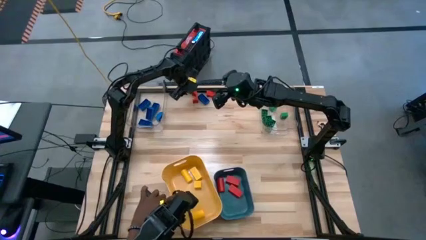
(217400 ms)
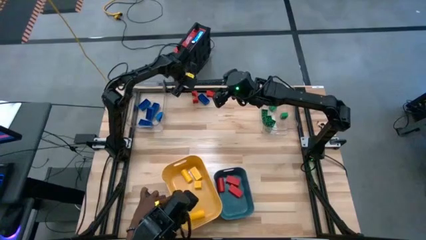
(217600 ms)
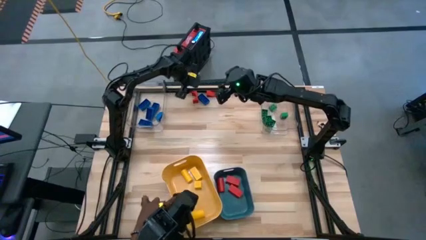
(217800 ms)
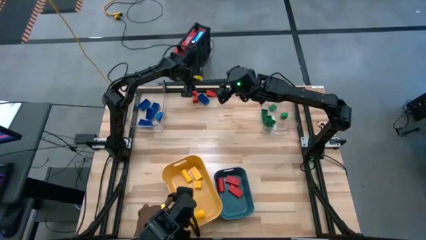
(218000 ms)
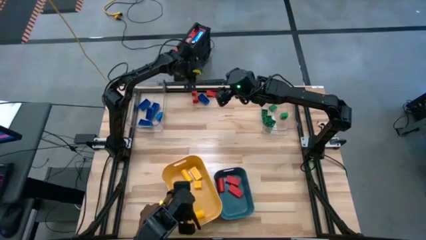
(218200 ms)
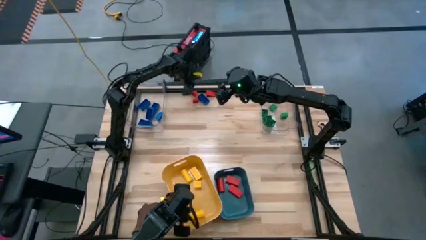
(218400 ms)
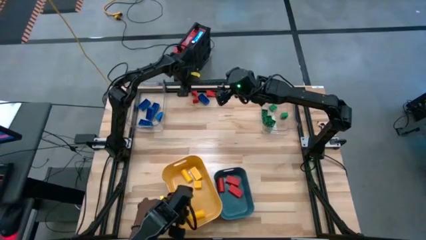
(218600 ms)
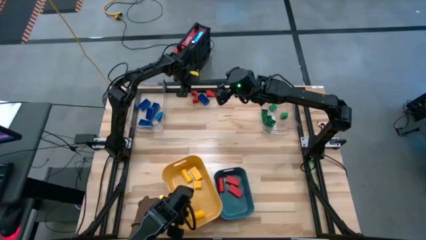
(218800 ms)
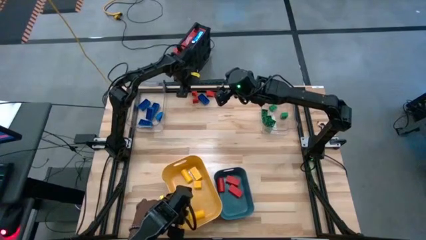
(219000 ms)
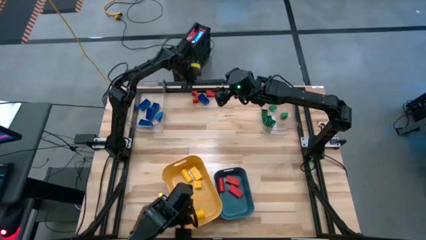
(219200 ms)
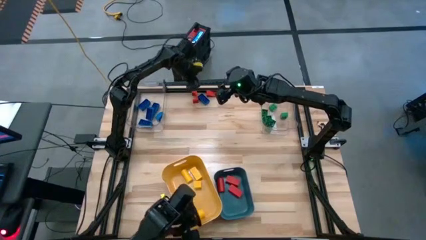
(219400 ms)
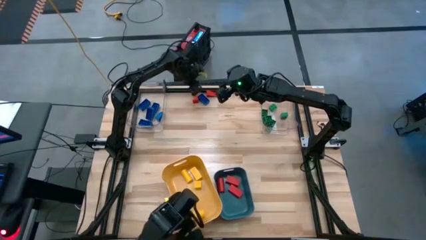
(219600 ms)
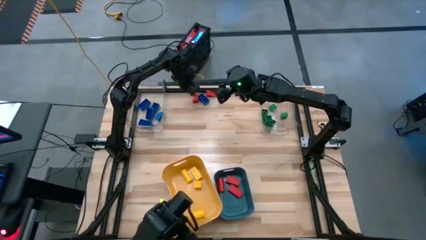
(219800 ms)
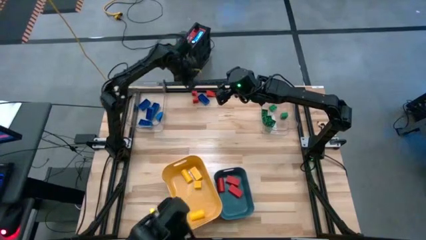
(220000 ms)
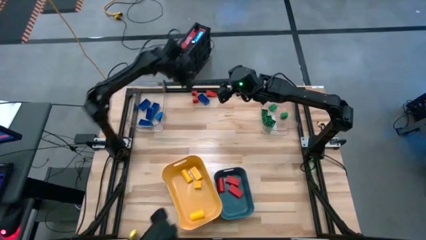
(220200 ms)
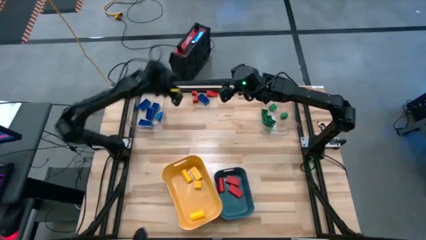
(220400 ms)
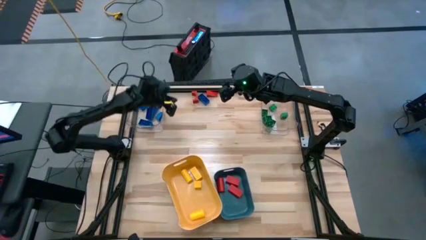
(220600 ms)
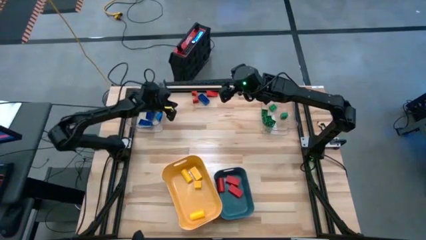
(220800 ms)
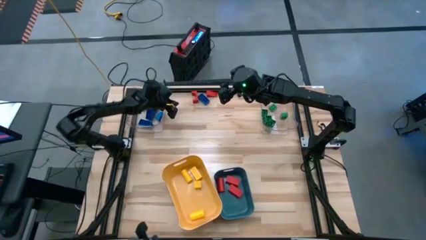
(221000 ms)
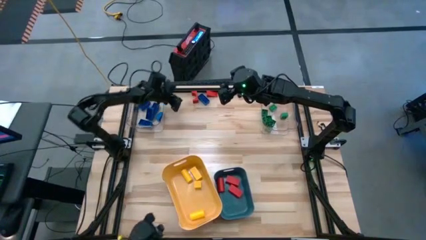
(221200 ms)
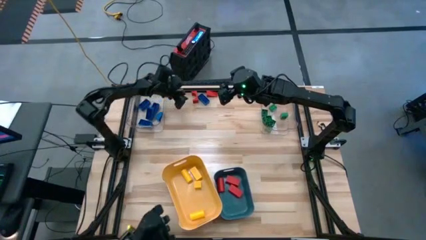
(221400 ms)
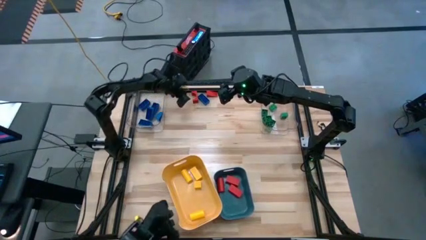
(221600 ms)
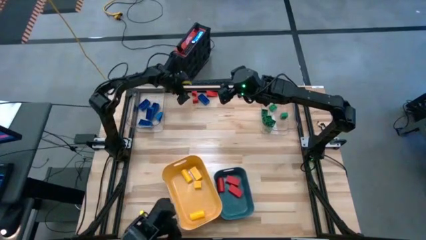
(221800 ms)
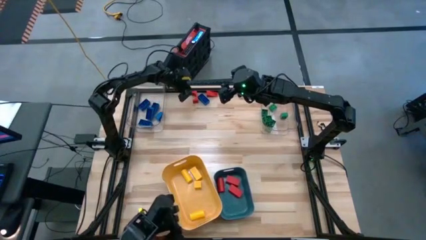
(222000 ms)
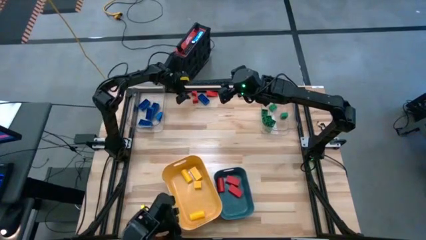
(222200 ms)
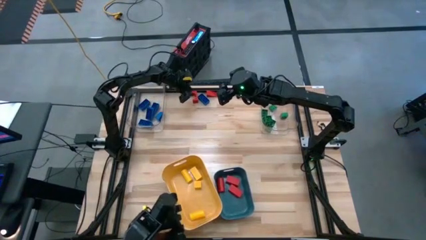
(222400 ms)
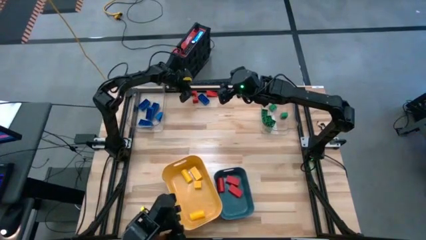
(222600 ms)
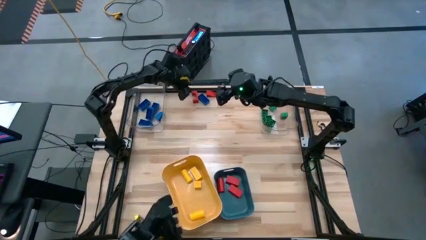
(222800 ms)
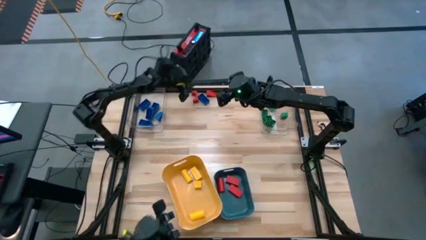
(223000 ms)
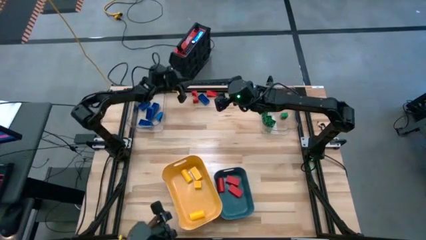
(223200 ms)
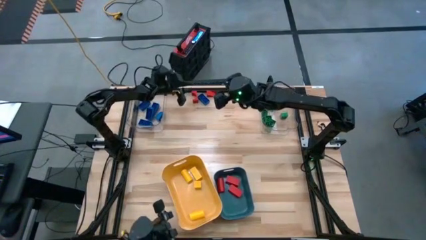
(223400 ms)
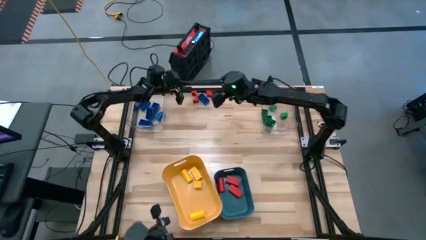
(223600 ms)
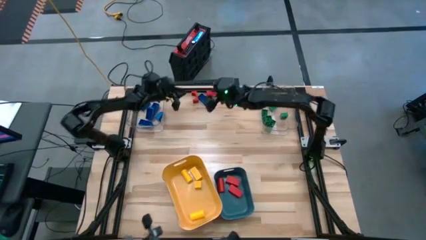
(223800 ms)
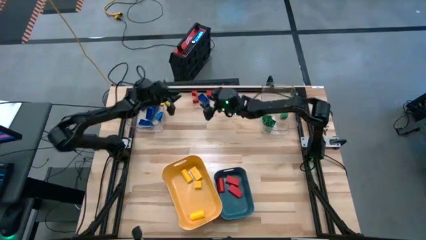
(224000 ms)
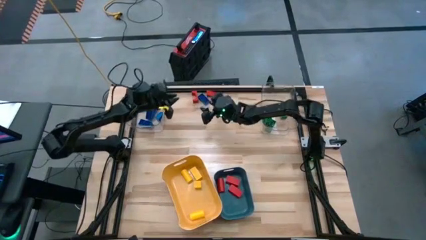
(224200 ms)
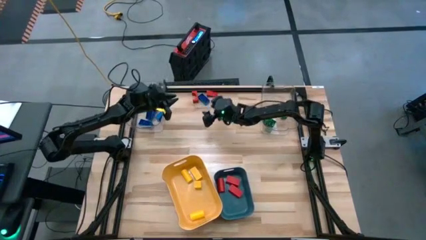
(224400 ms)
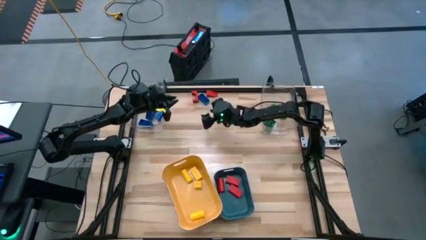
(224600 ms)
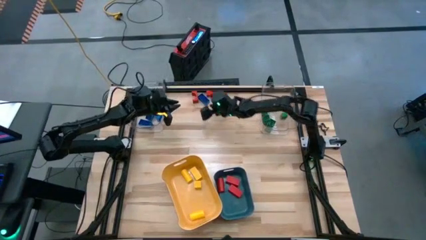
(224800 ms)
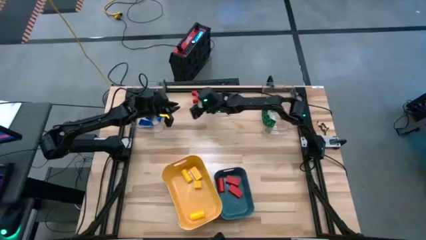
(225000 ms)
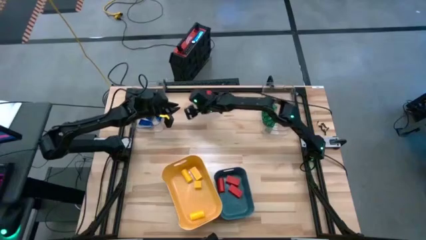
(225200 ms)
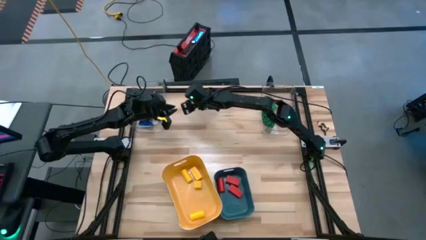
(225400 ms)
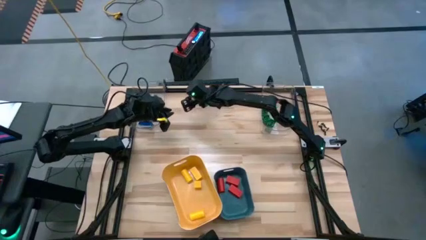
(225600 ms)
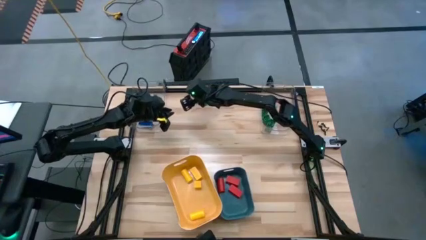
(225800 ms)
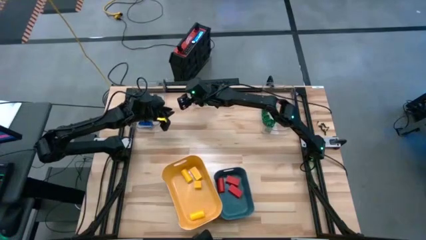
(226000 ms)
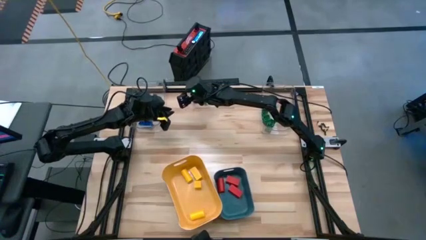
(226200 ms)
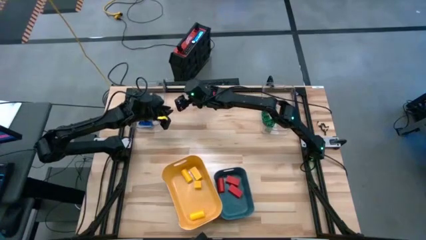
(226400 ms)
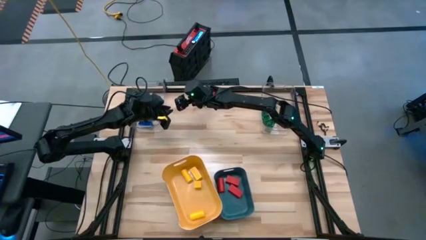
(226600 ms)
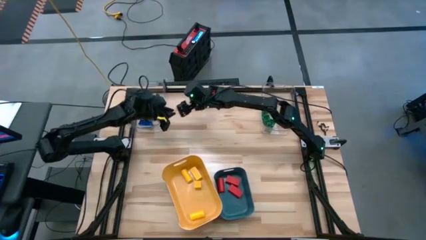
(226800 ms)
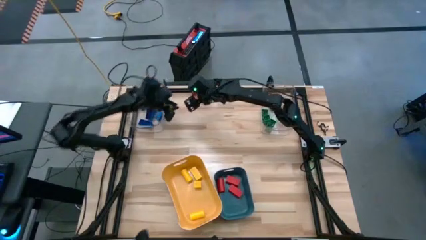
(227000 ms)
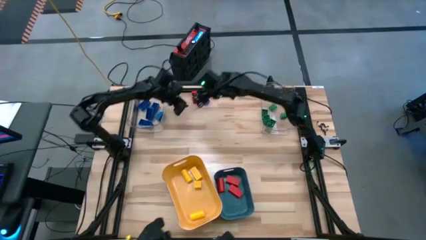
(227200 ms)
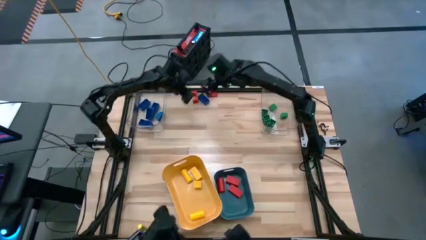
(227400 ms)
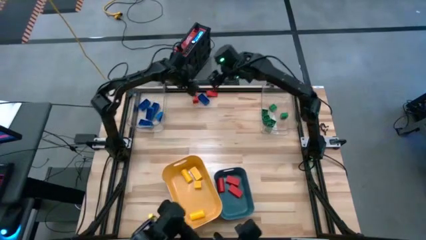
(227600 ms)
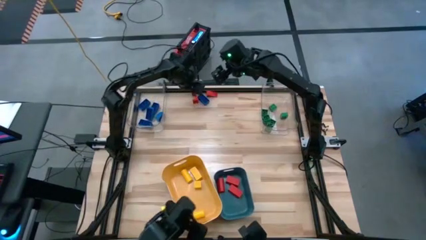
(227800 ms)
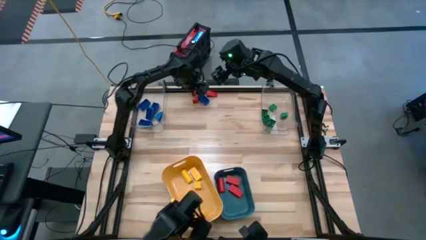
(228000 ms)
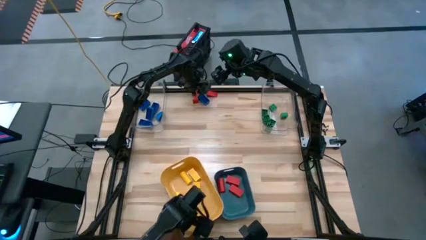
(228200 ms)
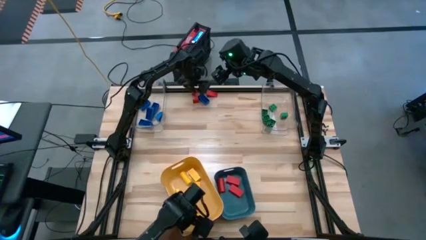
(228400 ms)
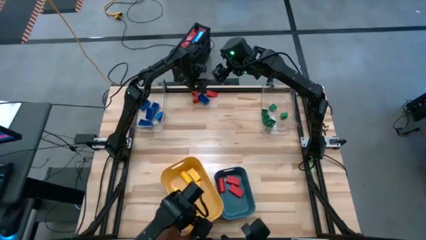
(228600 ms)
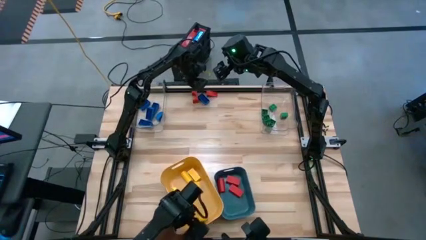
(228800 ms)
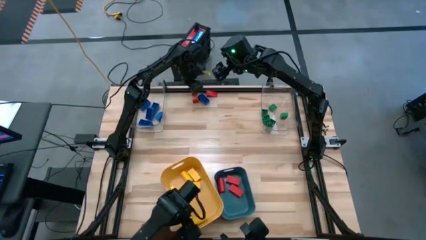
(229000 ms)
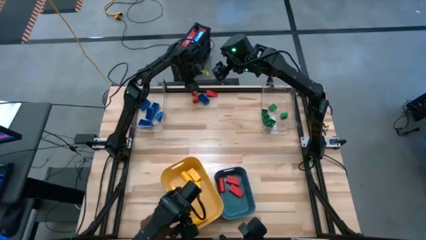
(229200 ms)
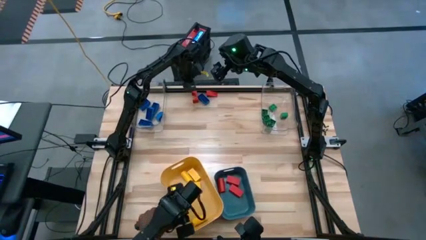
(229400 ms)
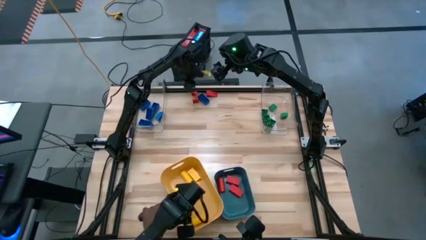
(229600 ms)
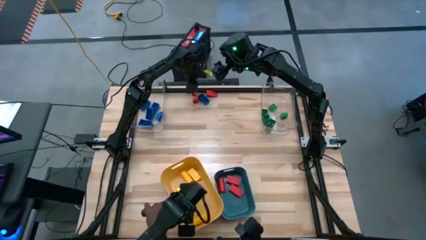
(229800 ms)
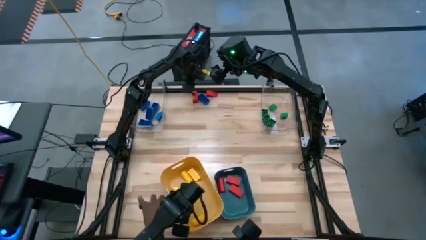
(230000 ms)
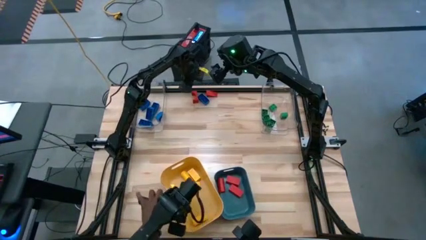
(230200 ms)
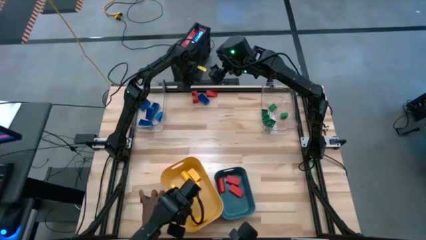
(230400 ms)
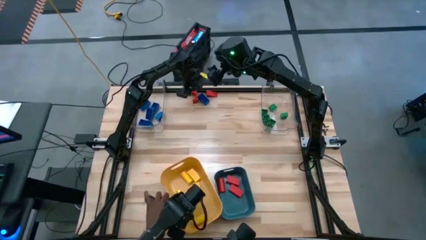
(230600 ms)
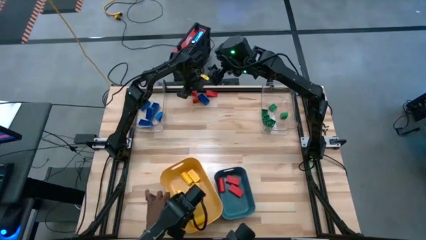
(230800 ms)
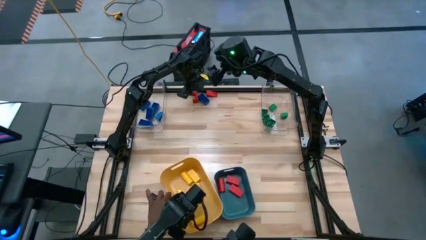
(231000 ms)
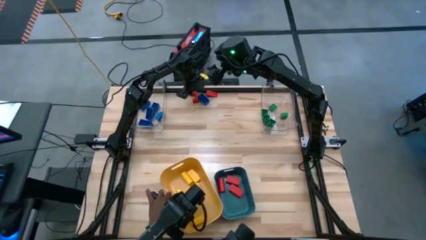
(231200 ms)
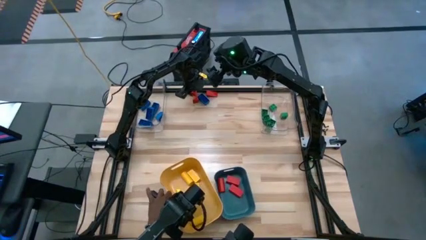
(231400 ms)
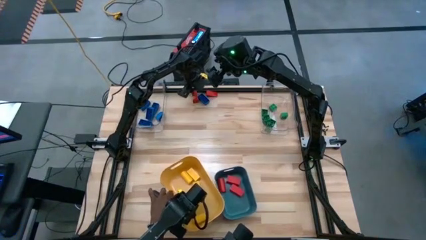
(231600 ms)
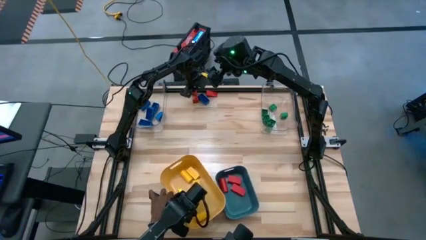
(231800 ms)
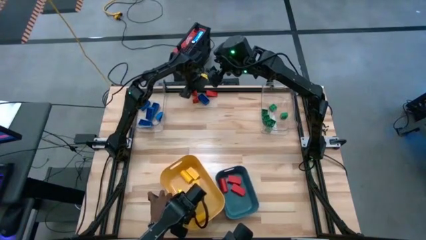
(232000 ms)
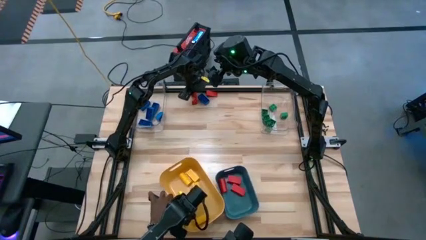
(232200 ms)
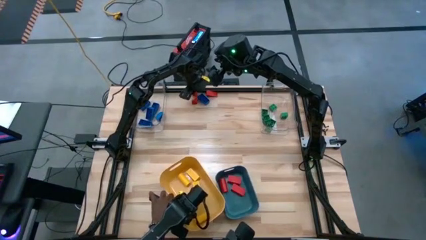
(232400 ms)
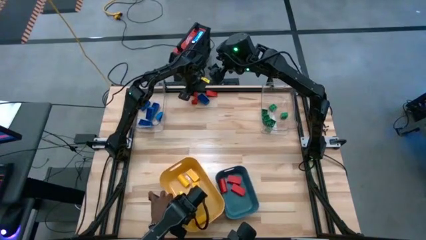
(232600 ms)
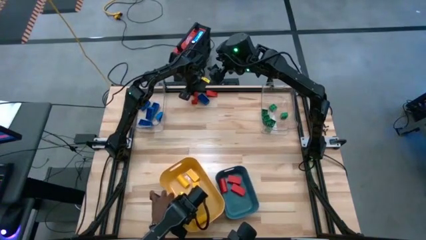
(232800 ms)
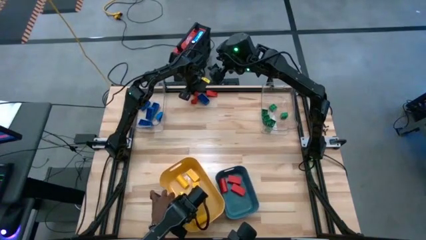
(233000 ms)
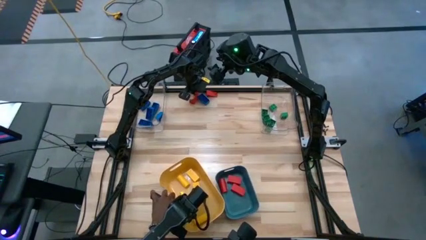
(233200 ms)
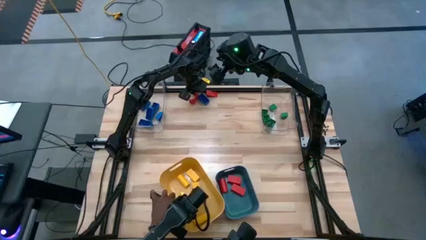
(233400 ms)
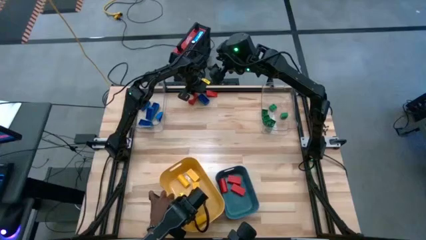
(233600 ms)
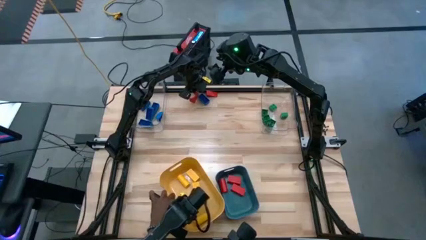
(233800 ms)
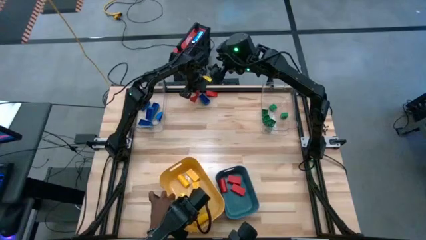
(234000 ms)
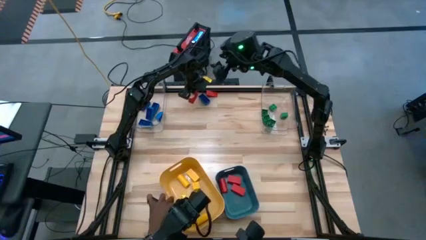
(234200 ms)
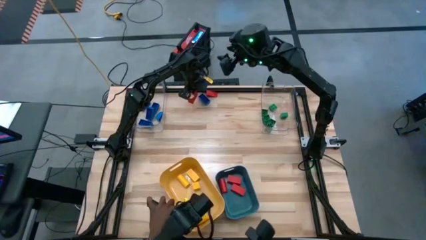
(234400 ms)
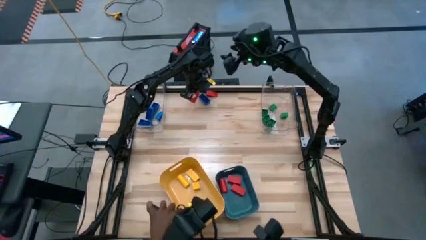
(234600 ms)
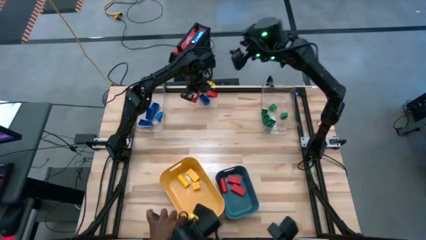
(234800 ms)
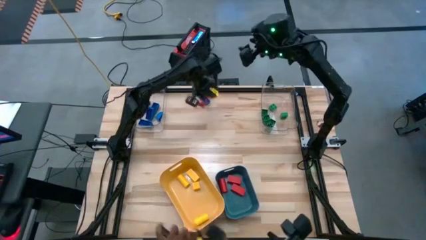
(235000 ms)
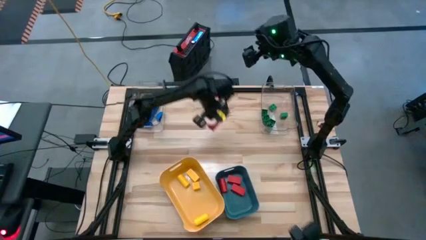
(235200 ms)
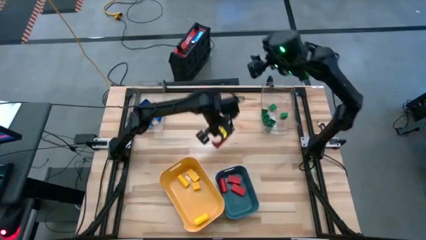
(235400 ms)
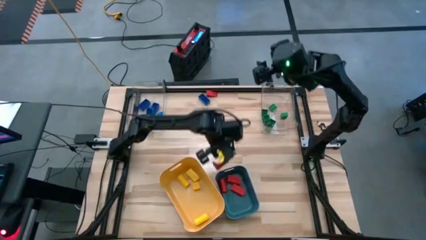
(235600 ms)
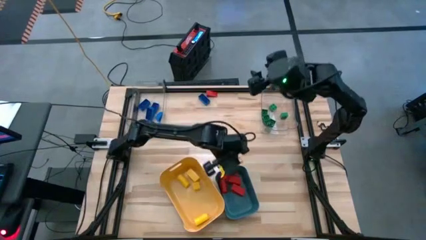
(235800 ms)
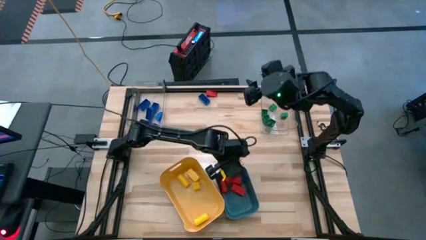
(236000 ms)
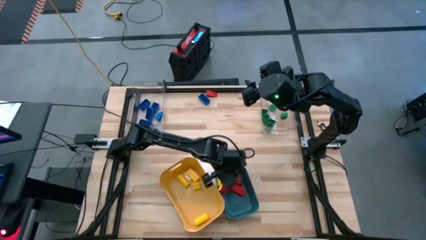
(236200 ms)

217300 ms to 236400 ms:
Task: Sort blocks
Put the red block into the blue bin
